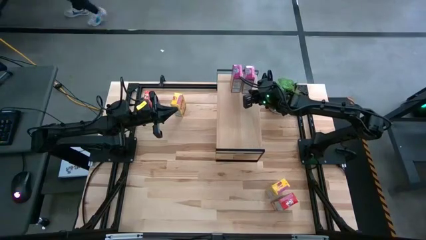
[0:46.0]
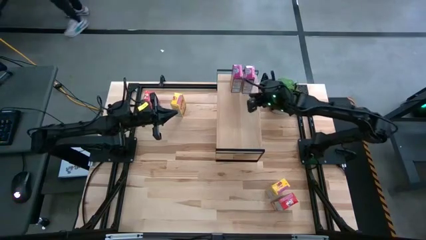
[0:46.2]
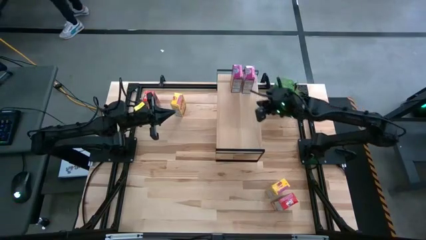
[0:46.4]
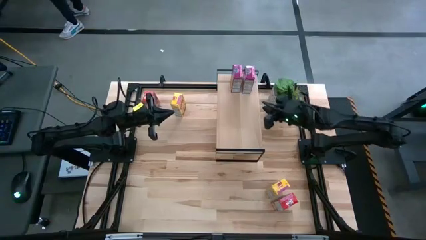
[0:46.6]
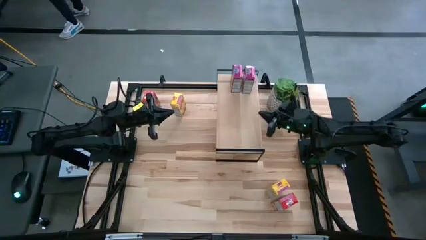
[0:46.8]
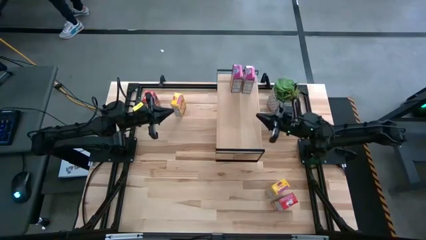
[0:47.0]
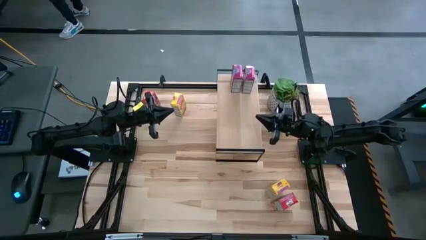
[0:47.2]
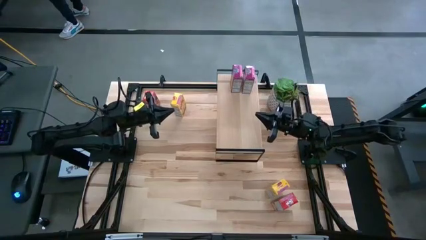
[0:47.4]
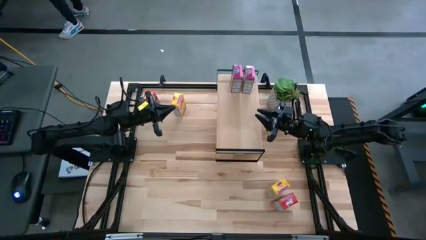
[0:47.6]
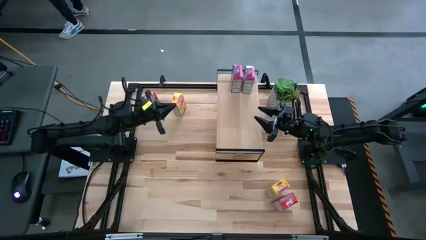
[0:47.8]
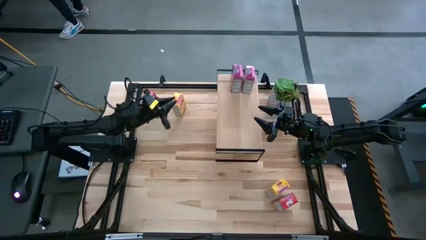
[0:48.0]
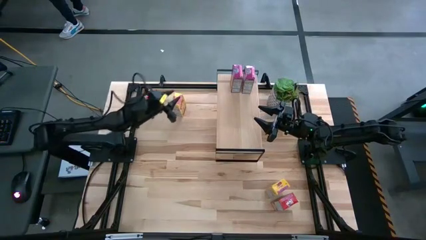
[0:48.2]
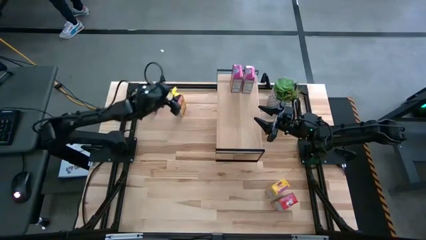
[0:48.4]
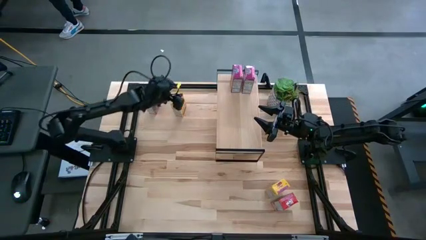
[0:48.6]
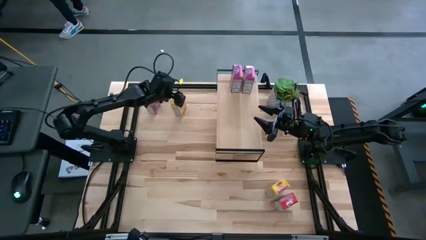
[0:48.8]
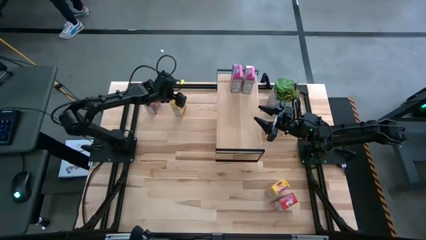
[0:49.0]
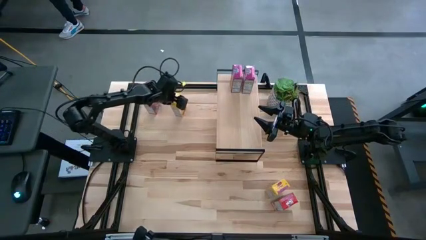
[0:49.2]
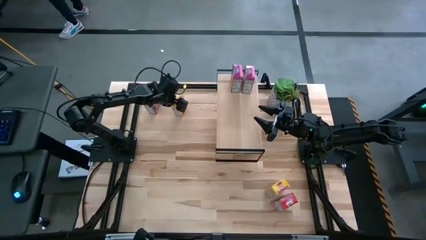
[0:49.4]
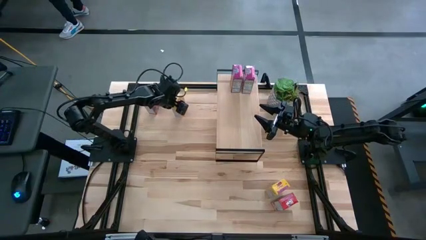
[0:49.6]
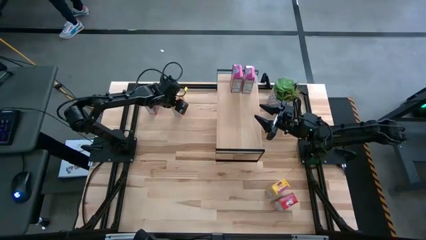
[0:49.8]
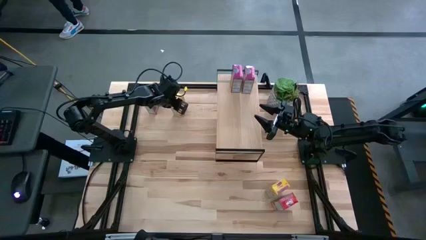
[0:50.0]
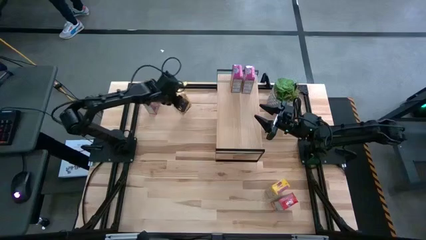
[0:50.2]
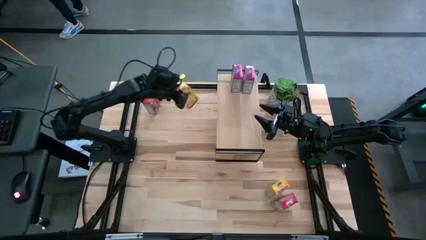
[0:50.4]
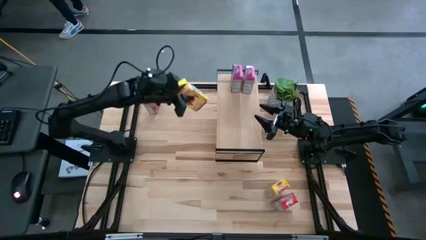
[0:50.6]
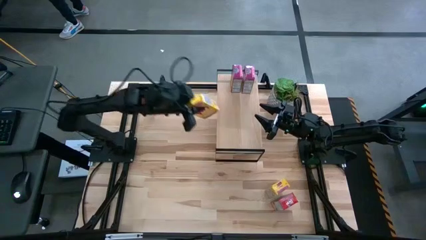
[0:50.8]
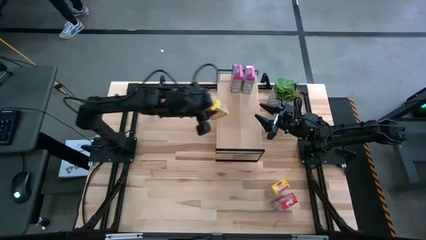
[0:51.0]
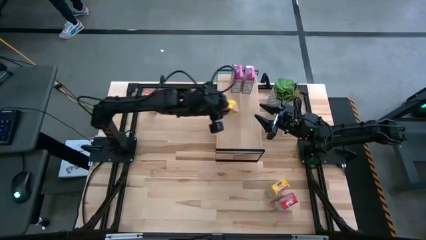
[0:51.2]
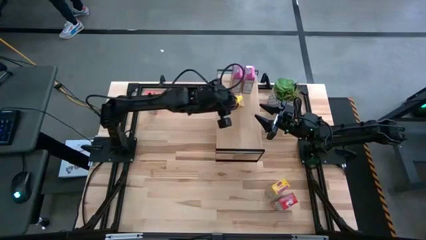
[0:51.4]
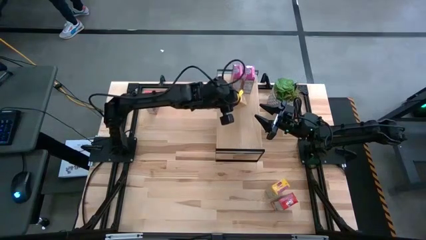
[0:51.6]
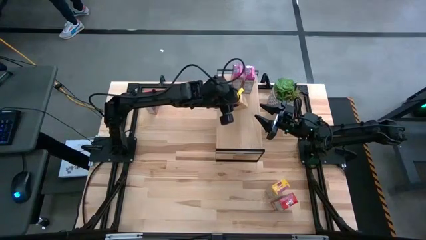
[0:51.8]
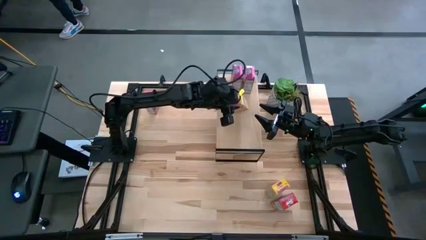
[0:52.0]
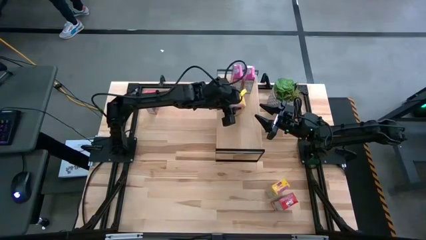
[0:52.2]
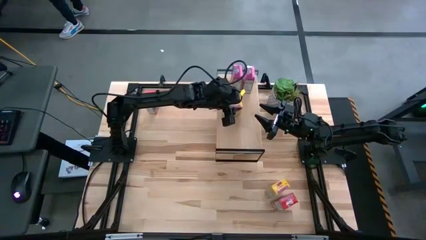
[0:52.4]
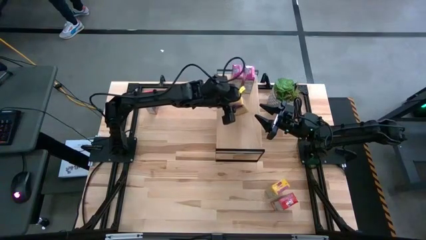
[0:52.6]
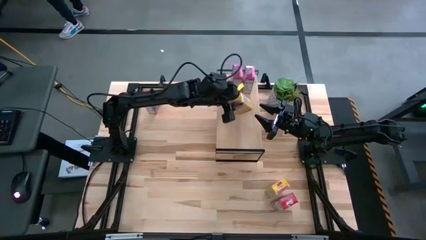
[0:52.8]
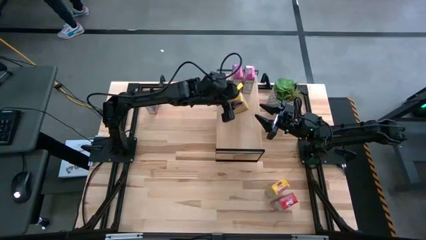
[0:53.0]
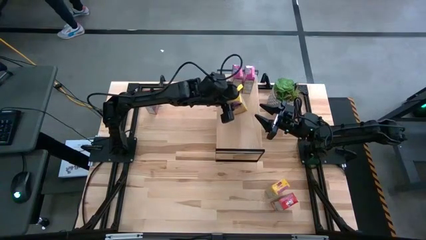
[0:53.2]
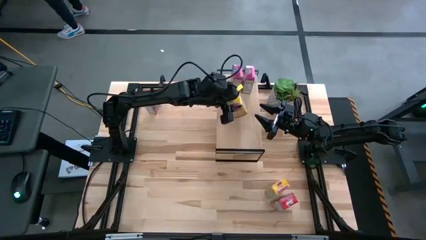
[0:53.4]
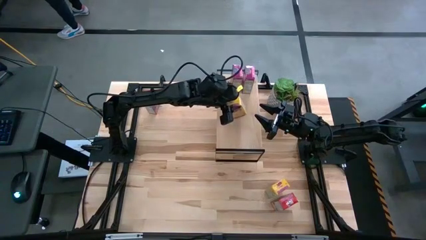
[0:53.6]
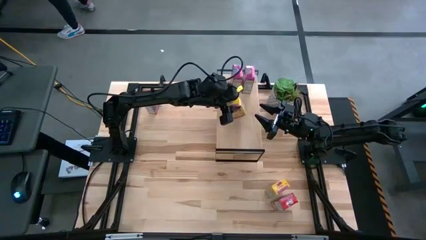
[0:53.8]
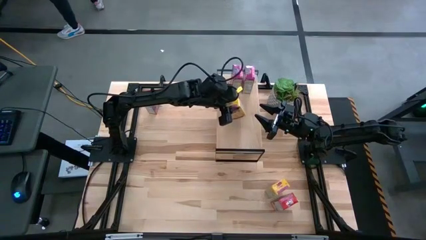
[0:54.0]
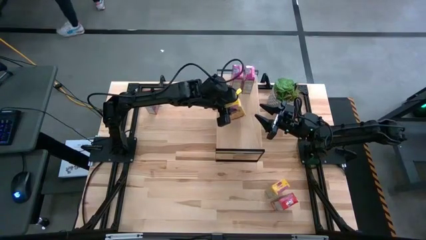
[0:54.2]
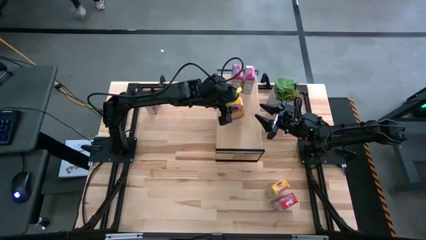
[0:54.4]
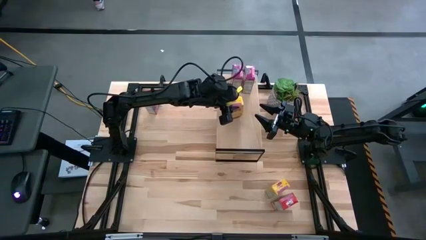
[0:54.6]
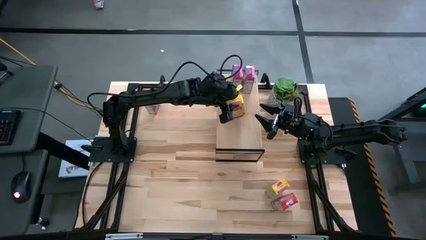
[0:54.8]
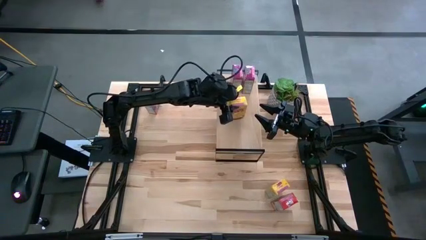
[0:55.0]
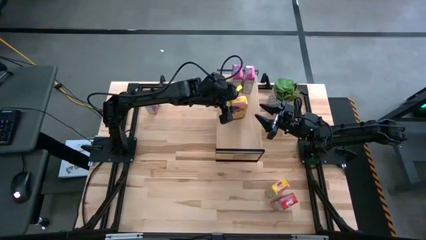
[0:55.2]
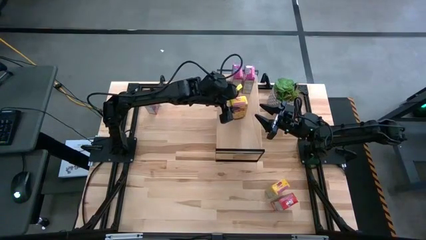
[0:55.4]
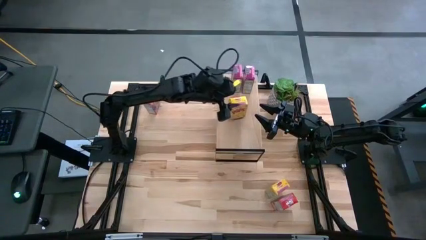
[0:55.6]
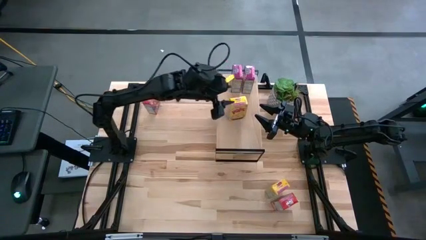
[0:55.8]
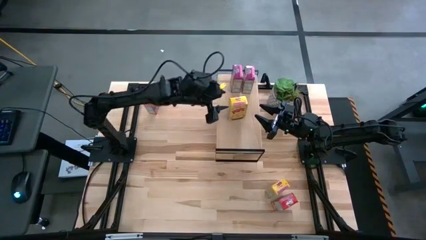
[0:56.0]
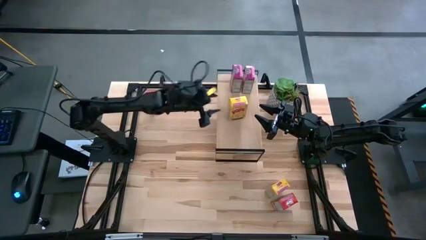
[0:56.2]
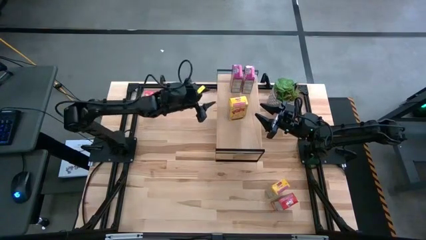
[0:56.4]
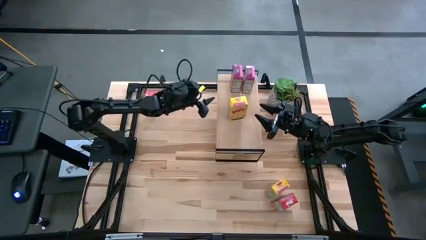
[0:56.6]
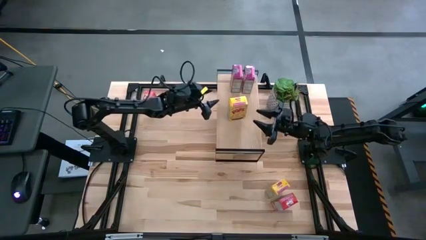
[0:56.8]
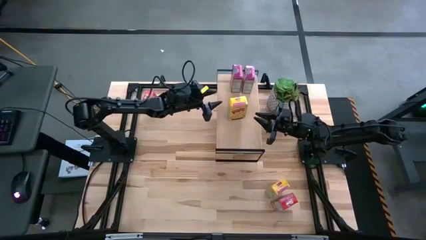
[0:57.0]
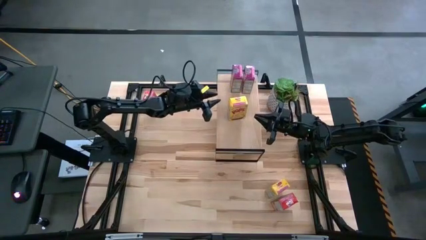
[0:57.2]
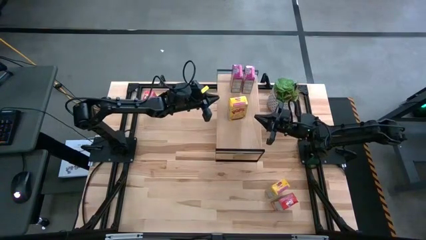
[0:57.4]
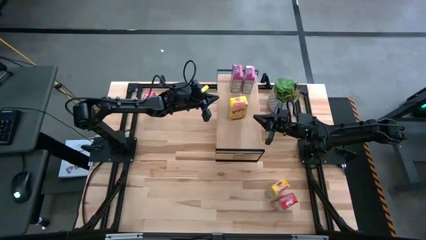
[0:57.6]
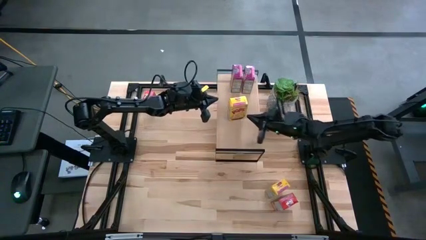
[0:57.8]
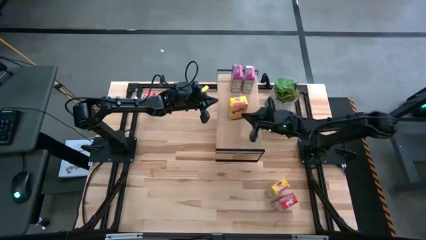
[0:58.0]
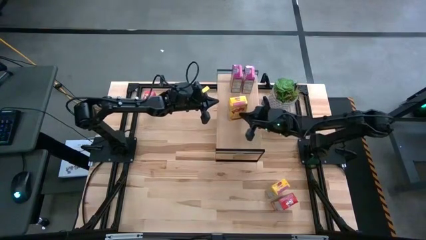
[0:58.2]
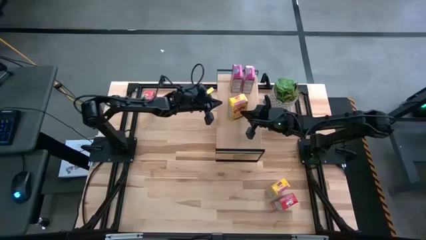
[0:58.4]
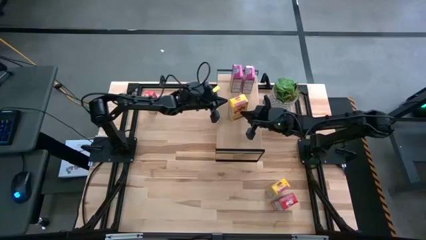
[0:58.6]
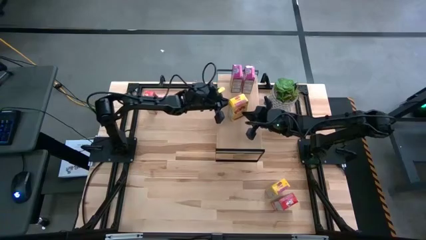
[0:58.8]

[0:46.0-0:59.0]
Task: Stack cereal on shelf
Put the top yellow cereal box on the shelf
